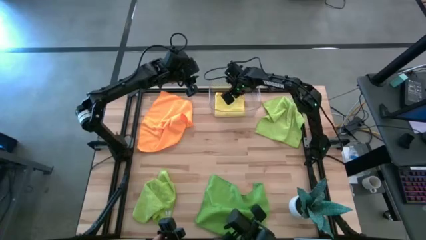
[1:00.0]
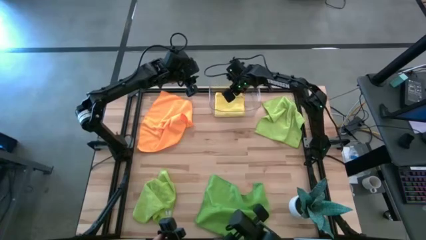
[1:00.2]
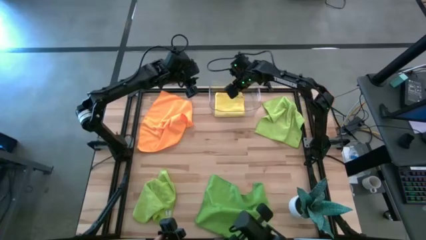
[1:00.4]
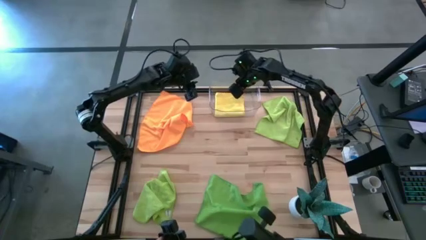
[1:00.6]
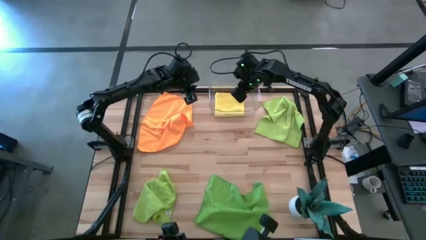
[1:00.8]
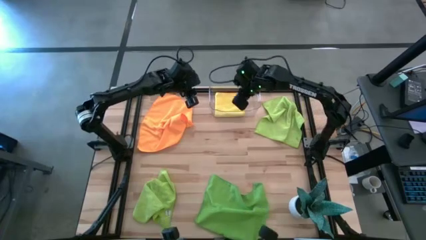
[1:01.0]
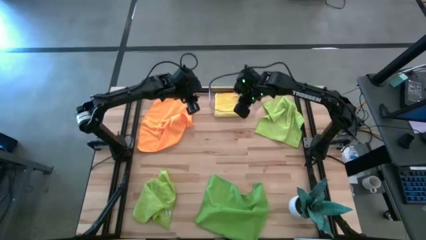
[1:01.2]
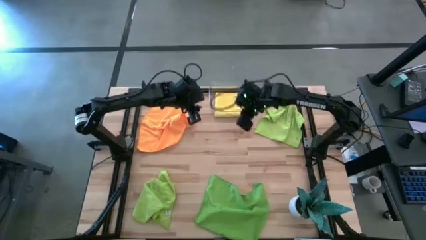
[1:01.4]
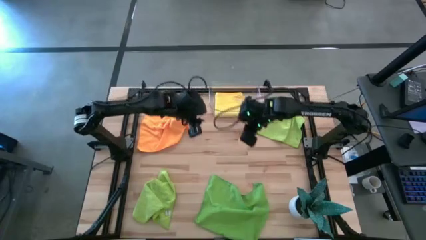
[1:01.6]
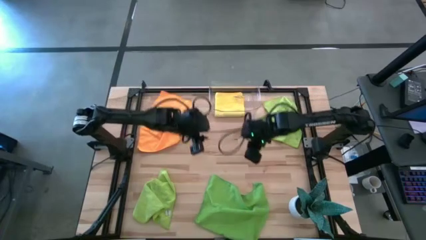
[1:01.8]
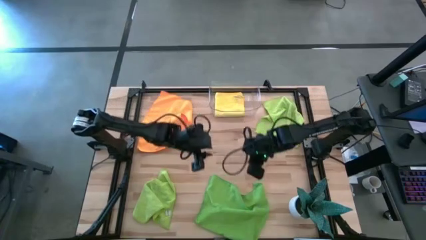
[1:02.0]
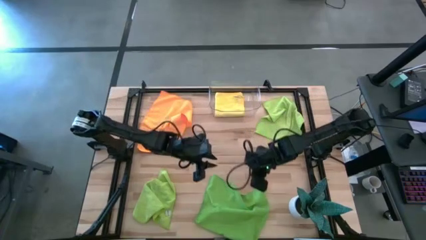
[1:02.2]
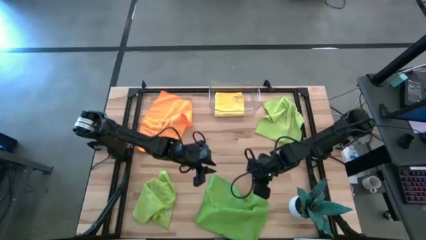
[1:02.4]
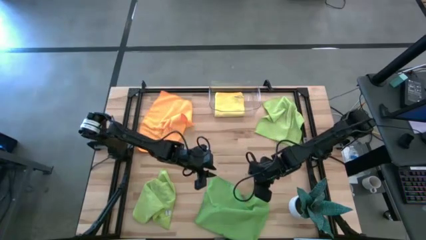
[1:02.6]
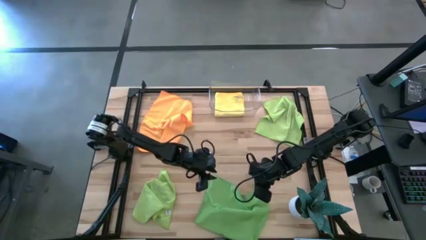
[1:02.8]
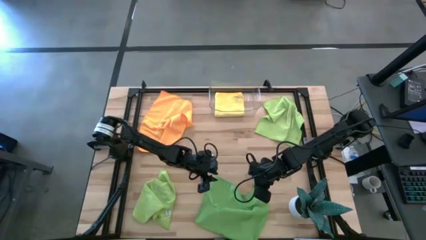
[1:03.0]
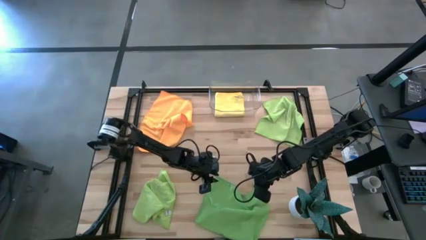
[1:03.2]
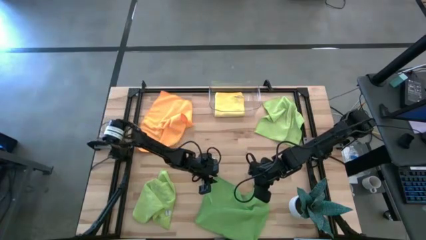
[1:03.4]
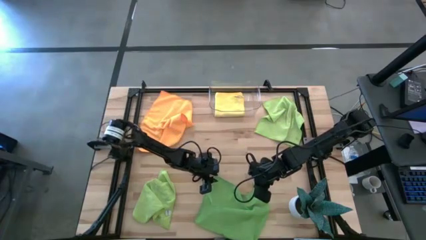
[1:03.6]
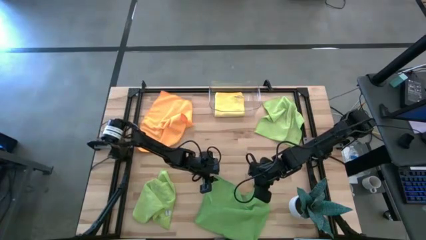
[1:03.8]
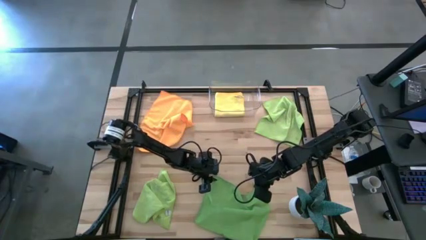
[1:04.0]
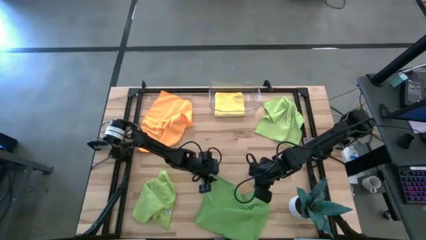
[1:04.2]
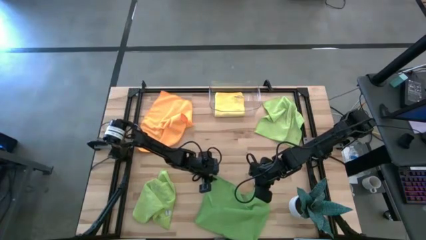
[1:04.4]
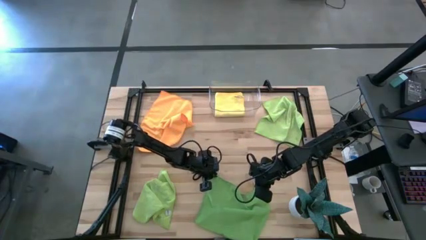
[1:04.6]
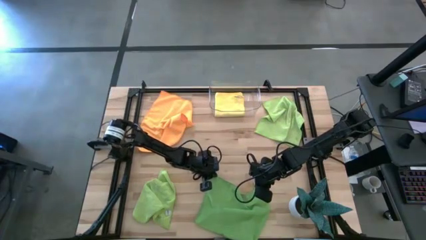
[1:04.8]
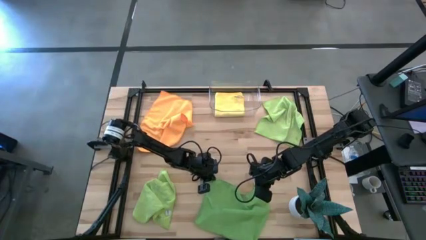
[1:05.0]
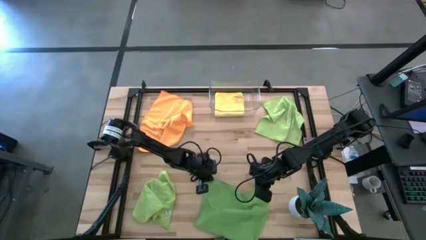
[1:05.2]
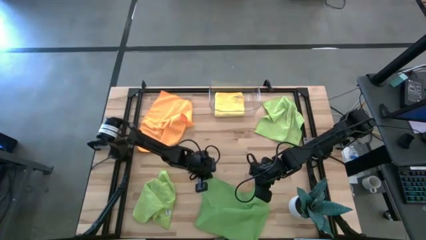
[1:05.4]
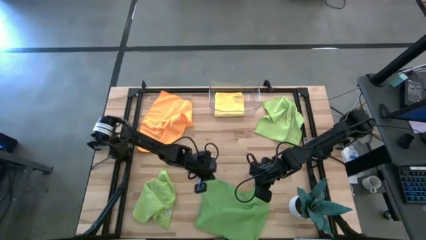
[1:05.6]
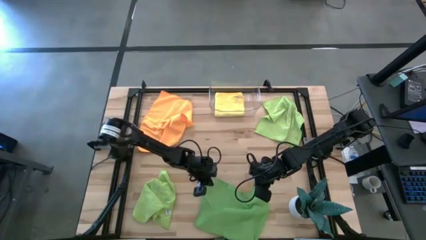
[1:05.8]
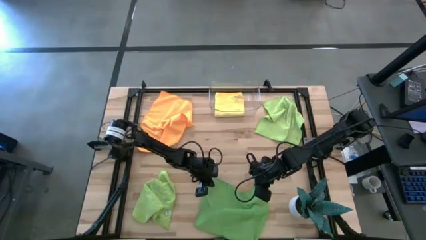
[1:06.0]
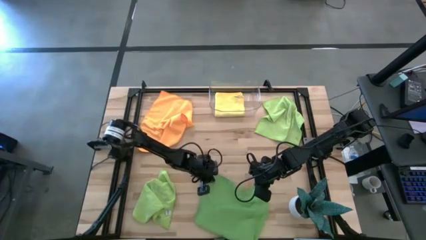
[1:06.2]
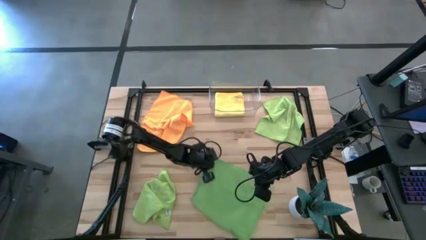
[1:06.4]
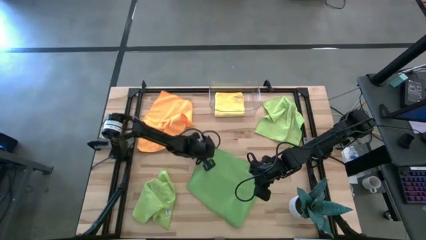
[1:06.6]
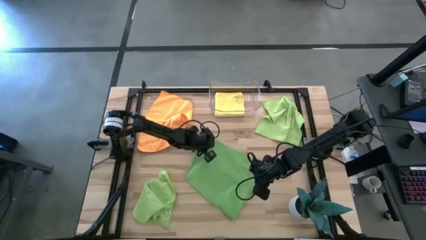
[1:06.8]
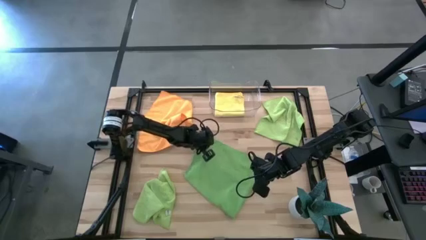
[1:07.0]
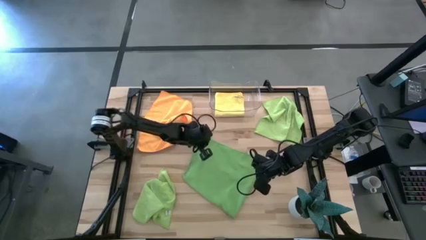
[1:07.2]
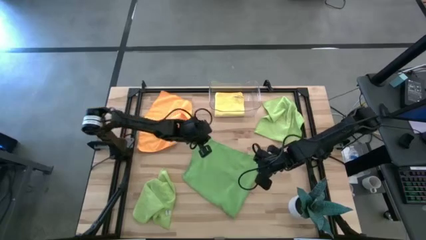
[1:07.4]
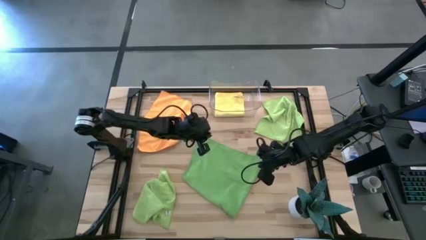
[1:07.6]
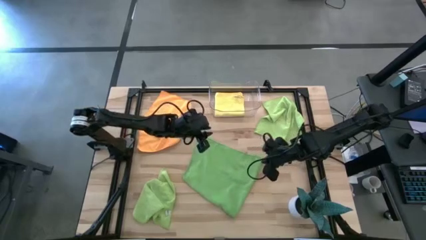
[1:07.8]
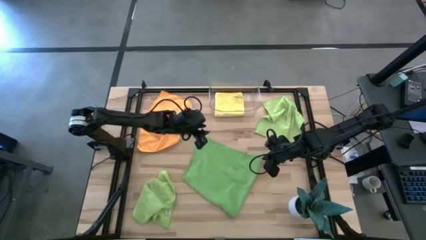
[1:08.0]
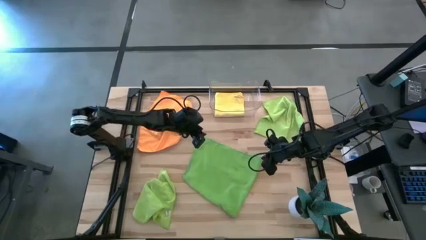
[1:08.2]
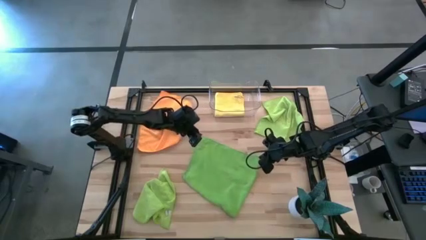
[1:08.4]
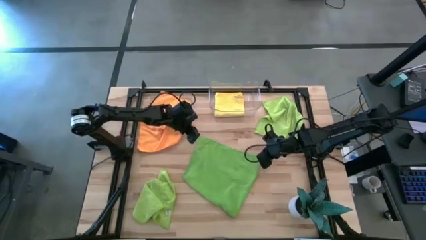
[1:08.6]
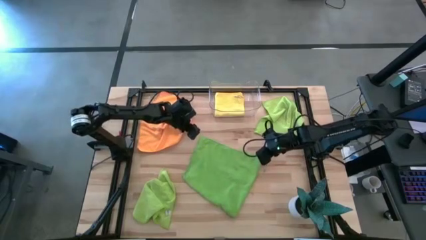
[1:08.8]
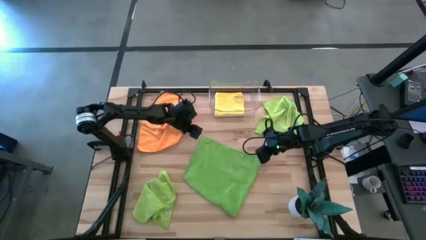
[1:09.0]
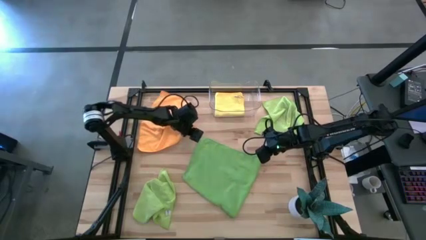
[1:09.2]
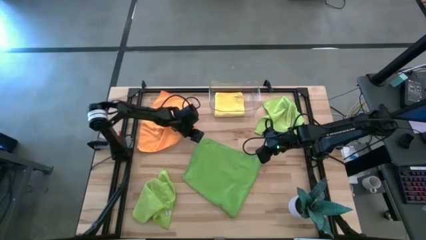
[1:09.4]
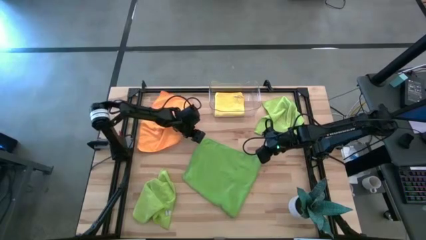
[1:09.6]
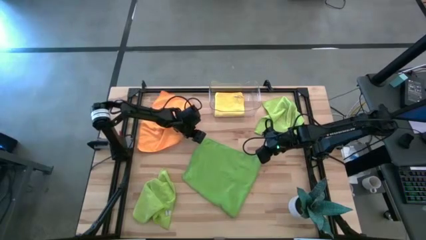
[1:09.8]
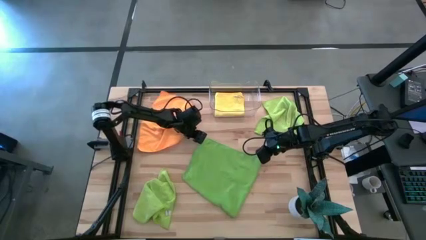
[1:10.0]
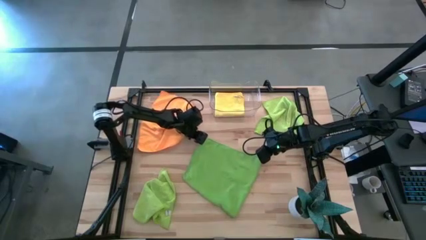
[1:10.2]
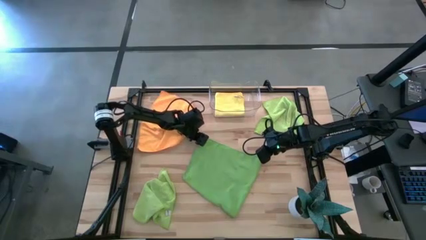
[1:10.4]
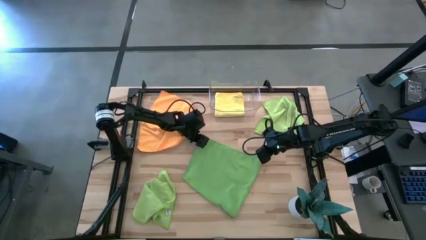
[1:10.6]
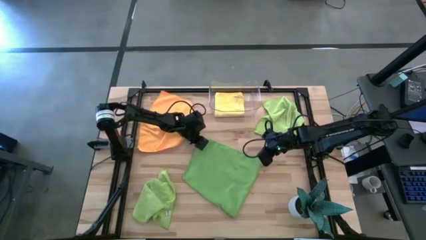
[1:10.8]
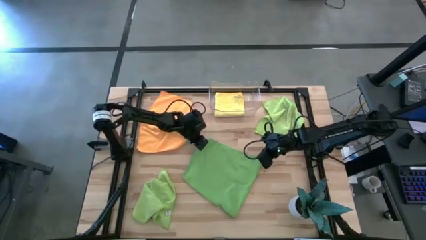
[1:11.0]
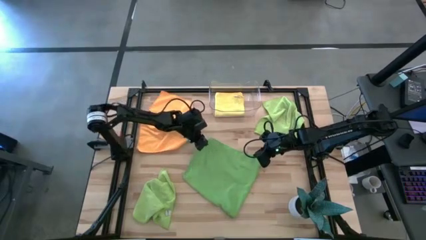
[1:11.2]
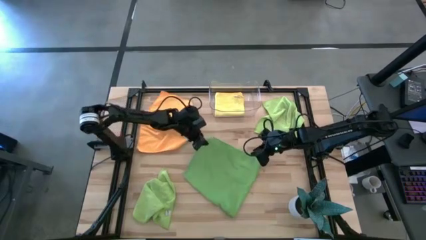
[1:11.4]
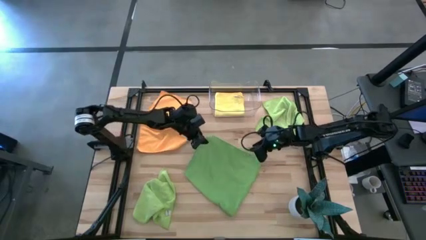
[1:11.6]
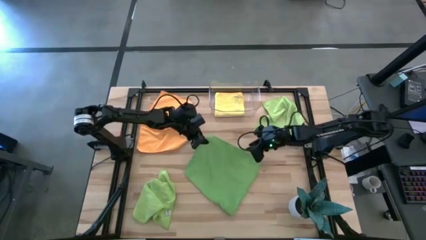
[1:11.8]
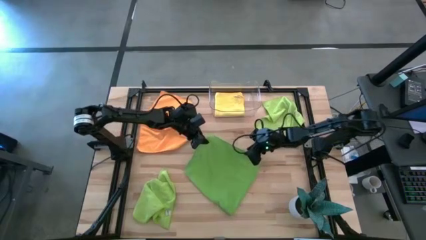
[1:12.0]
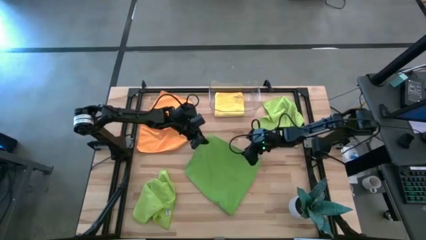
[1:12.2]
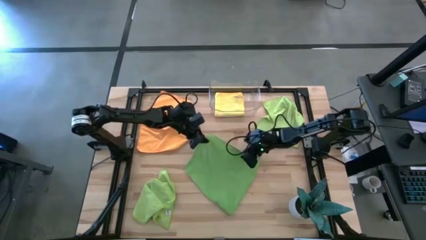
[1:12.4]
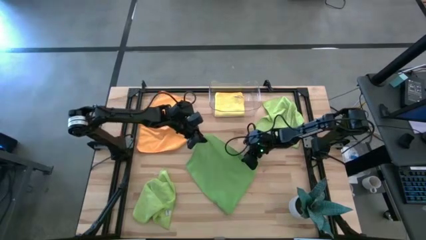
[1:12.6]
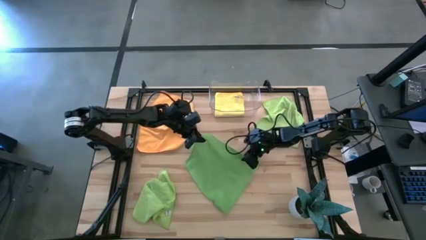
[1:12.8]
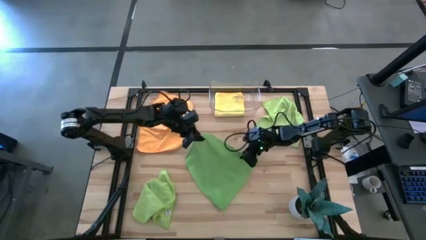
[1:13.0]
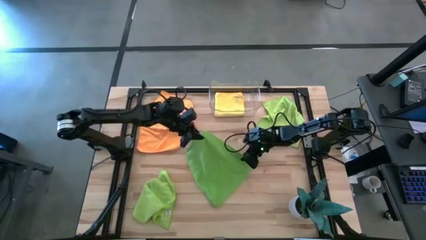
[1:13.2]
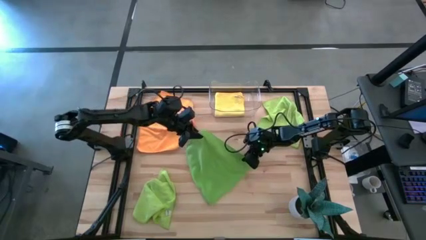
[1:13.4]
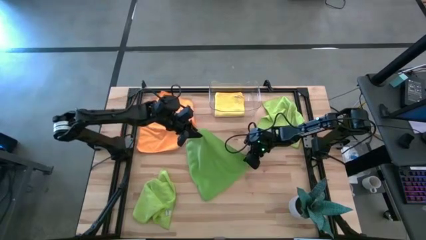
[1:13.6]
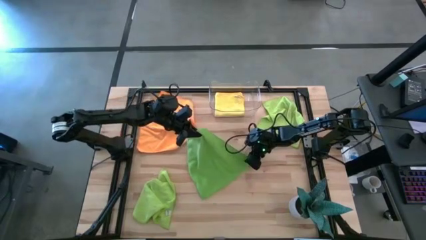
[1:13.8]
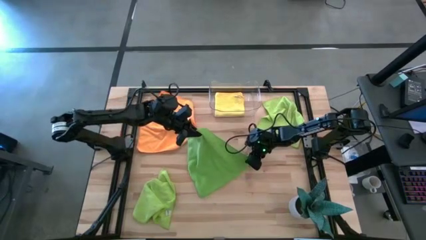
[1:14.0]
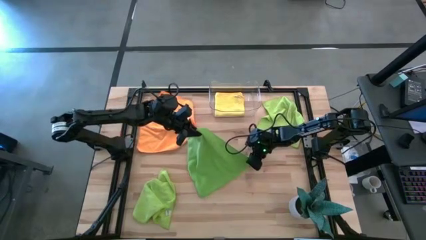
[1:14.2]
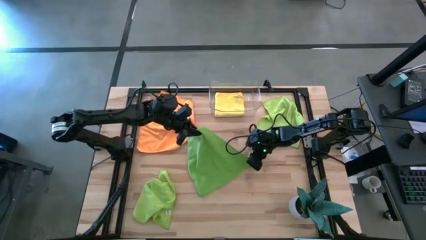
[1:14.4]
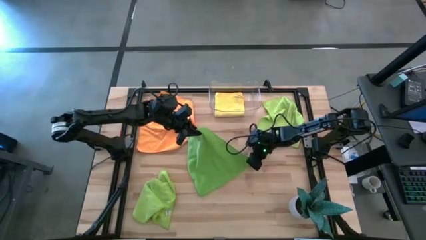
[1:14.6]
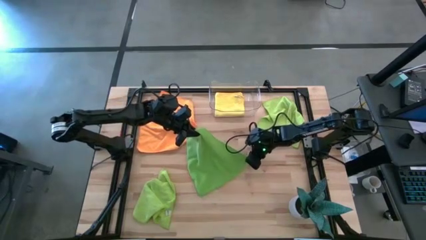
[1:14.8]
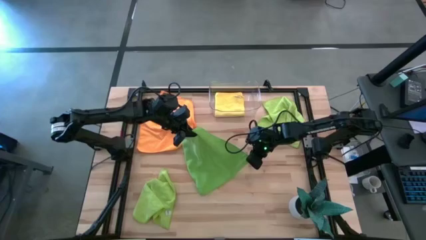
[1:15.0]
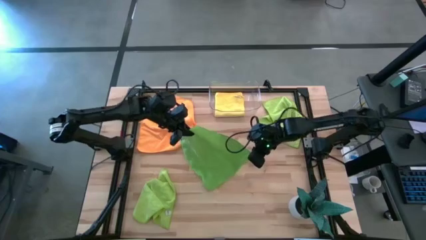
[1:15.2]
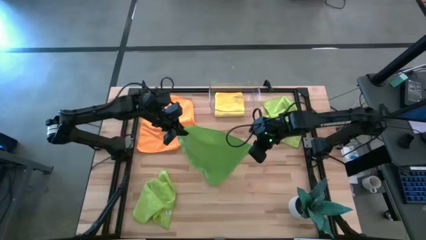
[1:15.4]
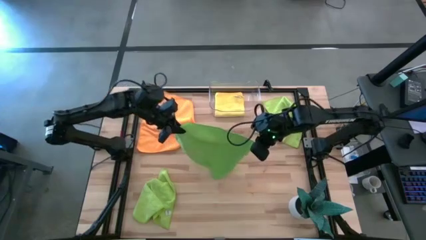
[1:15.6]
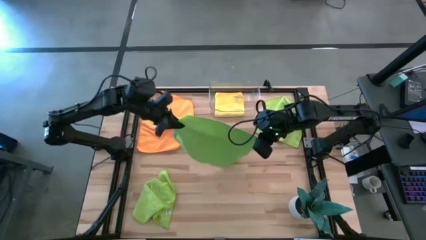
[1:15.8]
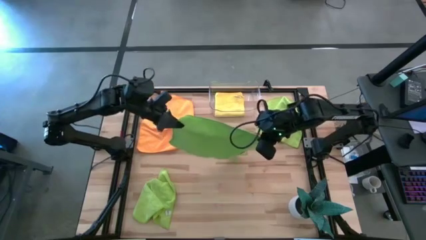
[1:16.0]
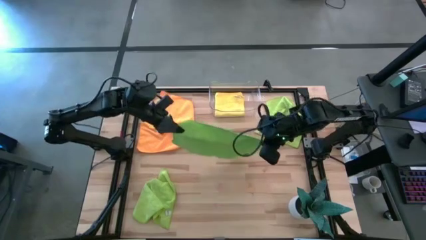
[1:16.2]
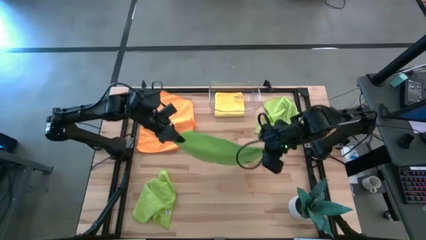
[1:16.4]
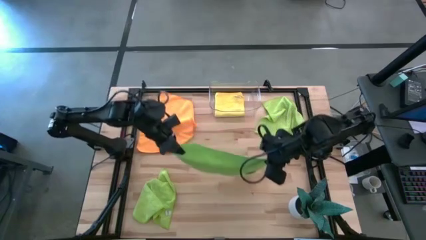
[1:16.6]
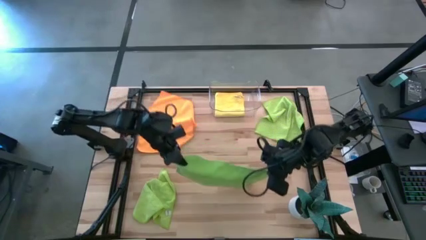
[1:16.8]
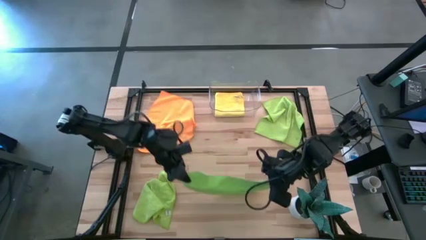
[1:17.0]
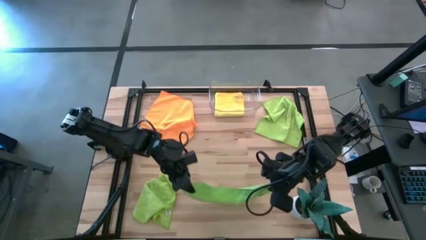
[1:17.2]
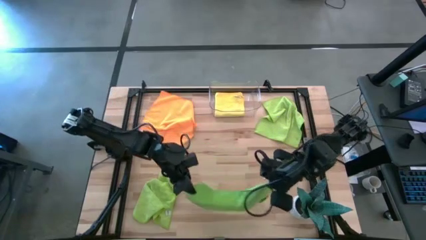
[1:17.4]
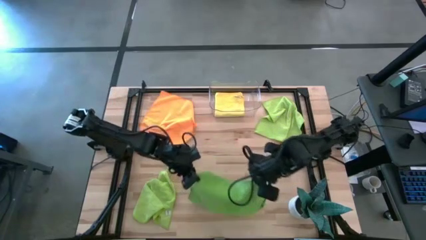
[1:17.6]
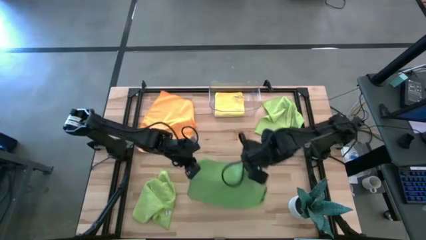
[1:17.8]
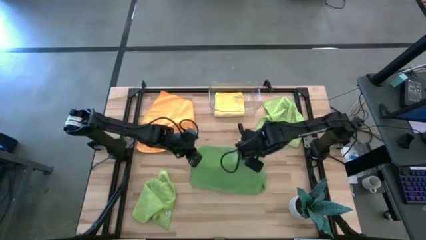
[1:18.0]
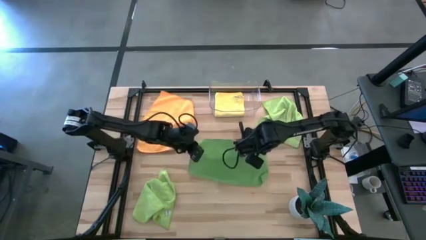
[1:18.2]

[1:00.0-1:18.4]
Task: Fold microfiber towels
Fold the green microfiber cloth
